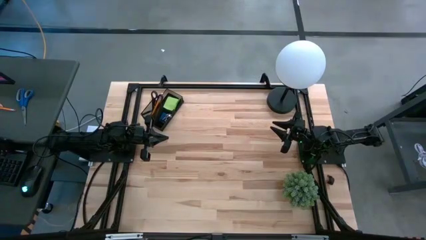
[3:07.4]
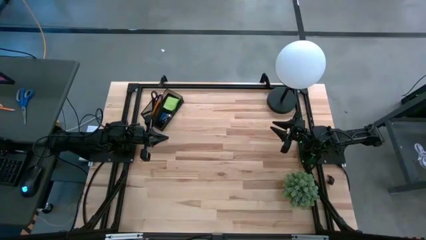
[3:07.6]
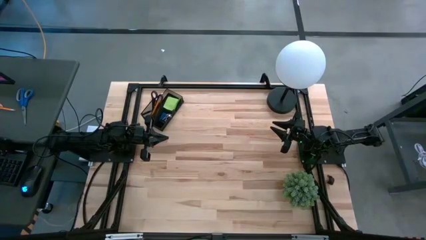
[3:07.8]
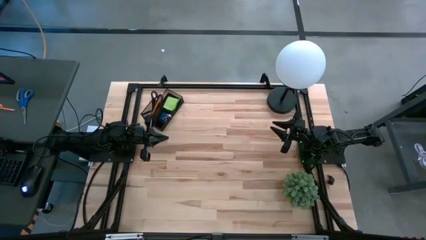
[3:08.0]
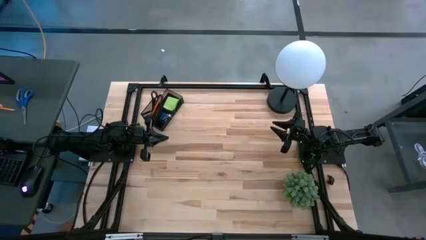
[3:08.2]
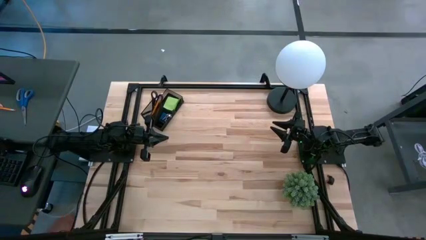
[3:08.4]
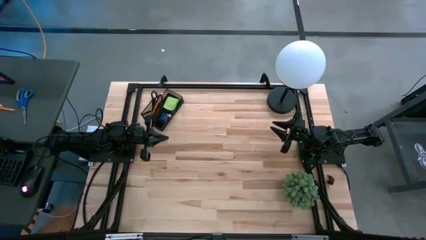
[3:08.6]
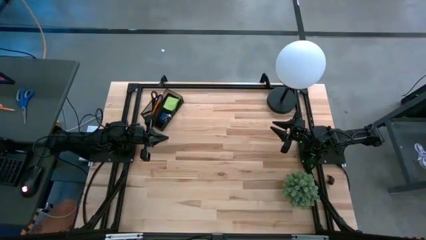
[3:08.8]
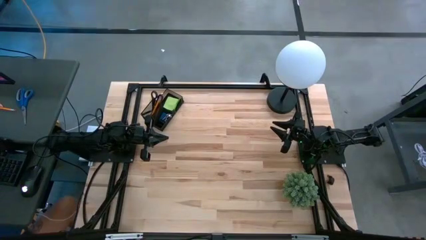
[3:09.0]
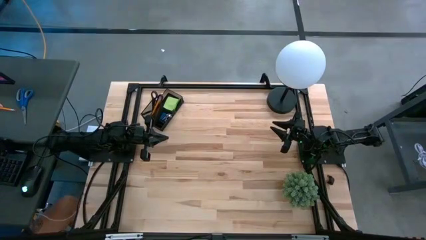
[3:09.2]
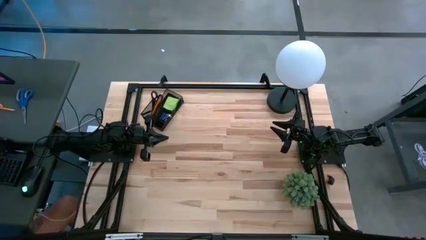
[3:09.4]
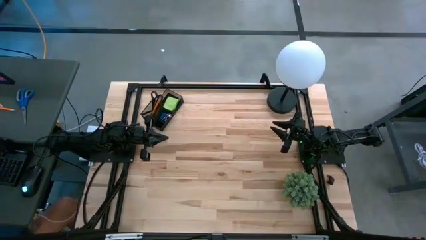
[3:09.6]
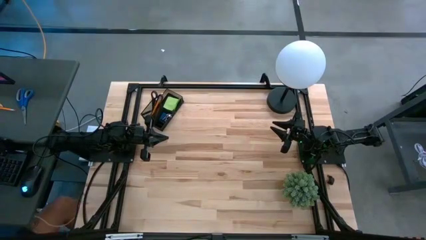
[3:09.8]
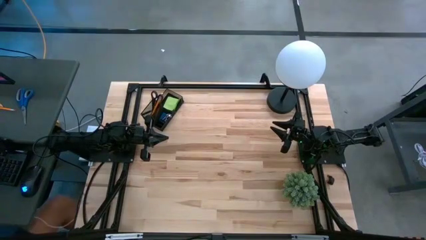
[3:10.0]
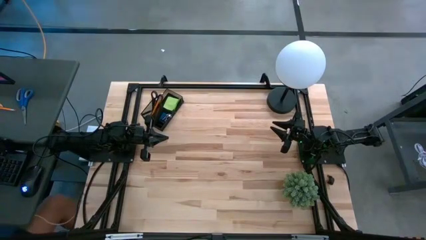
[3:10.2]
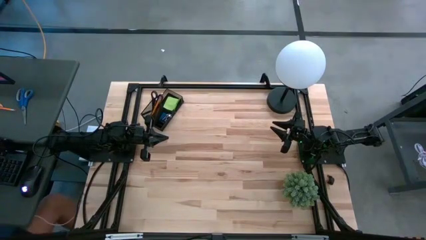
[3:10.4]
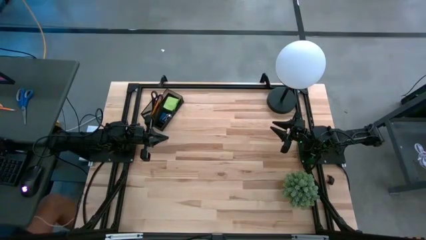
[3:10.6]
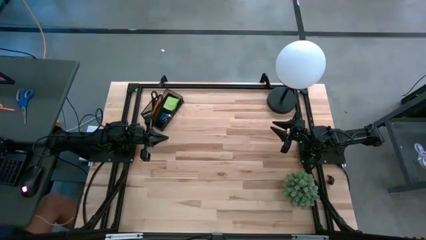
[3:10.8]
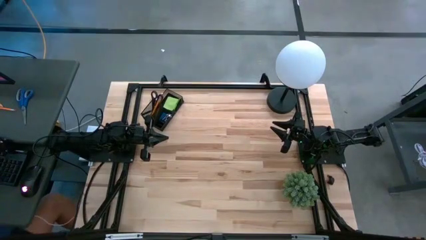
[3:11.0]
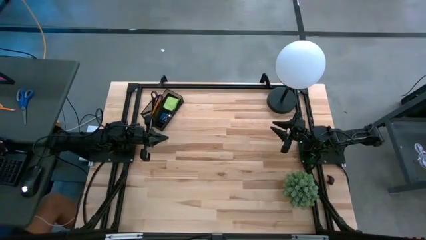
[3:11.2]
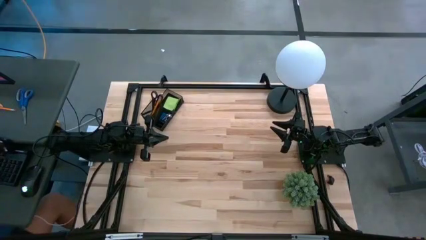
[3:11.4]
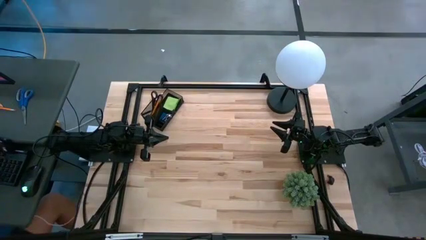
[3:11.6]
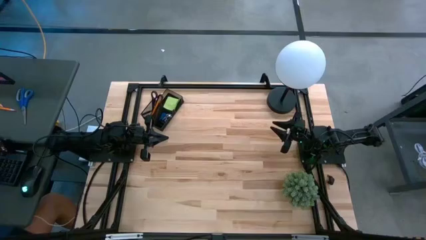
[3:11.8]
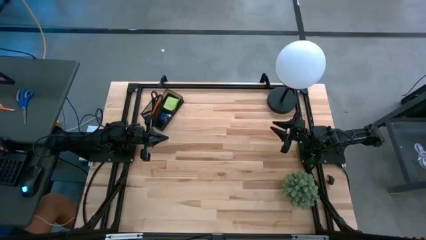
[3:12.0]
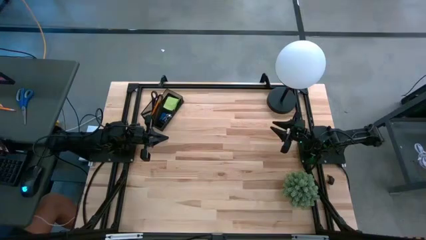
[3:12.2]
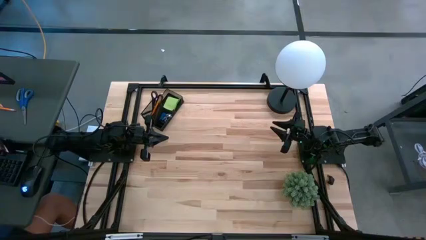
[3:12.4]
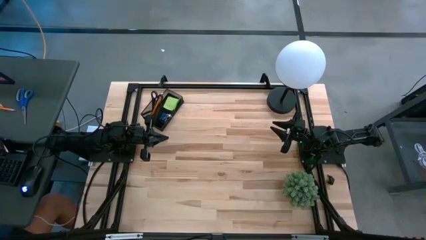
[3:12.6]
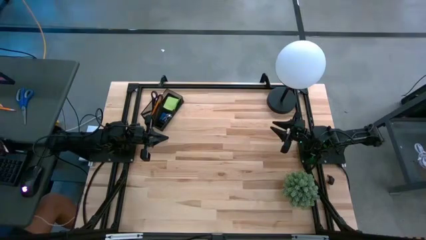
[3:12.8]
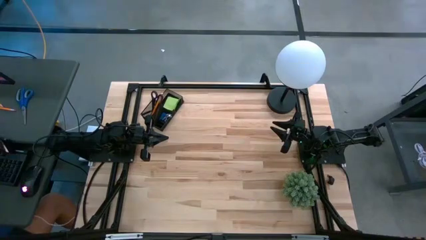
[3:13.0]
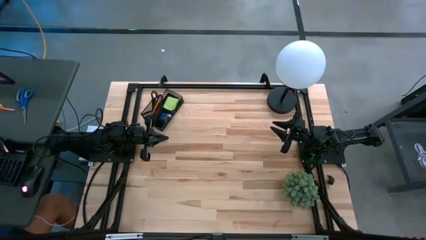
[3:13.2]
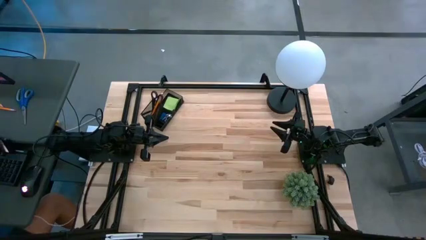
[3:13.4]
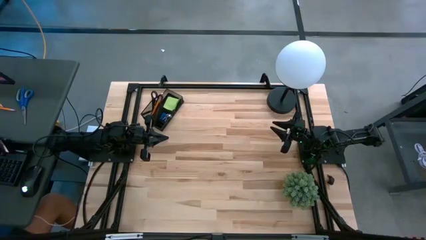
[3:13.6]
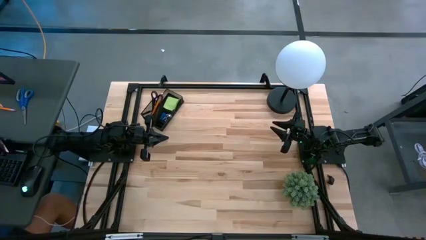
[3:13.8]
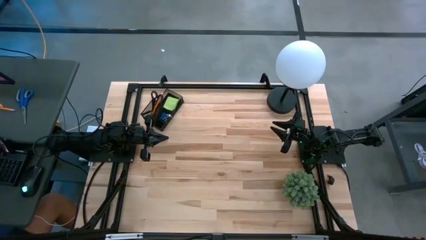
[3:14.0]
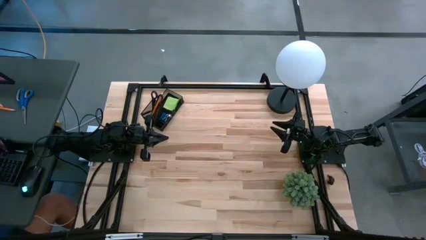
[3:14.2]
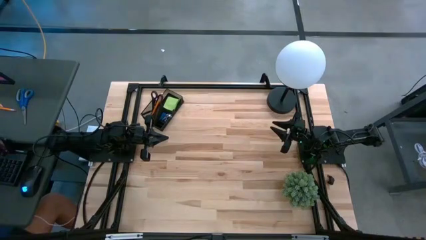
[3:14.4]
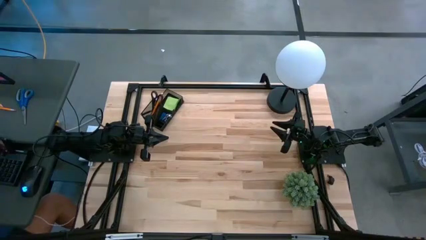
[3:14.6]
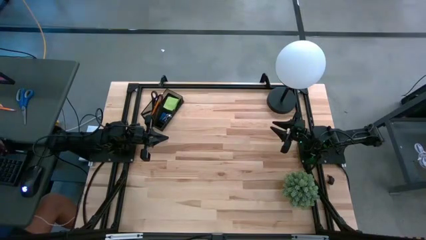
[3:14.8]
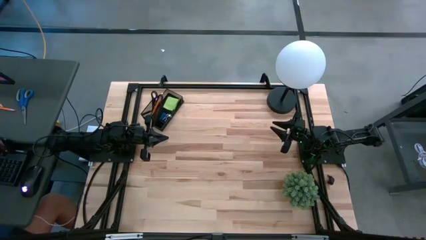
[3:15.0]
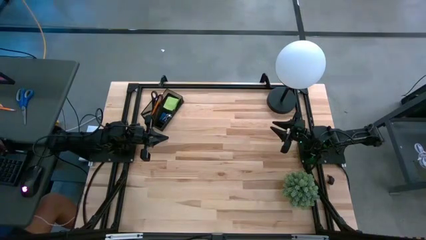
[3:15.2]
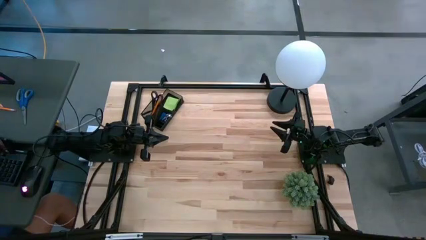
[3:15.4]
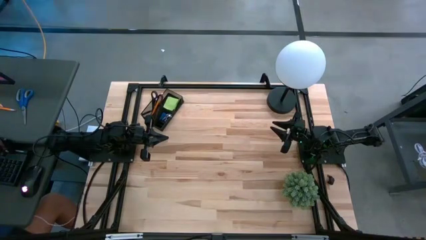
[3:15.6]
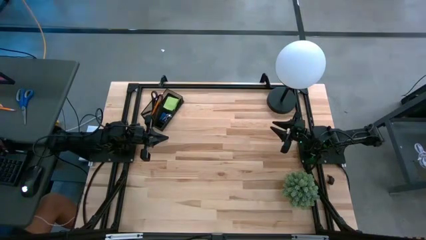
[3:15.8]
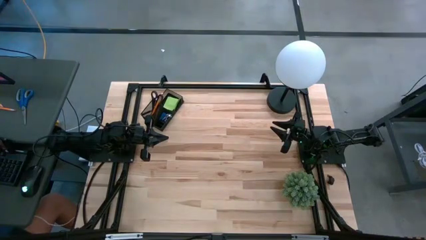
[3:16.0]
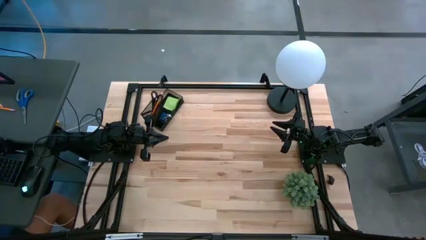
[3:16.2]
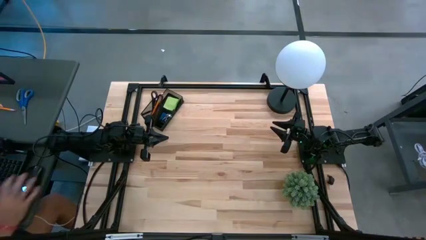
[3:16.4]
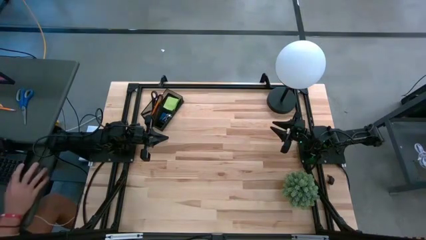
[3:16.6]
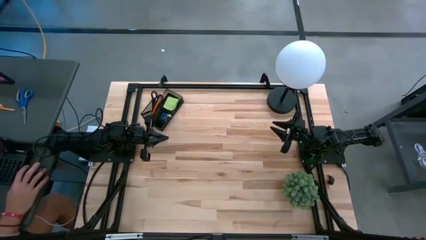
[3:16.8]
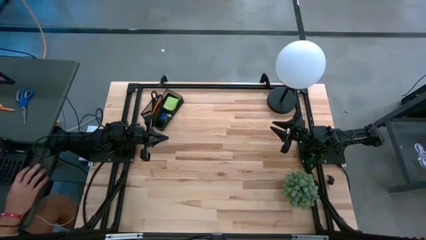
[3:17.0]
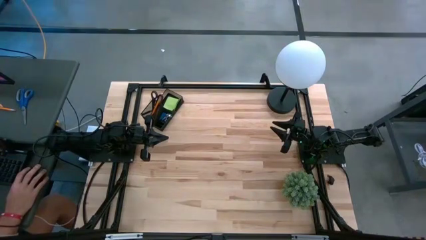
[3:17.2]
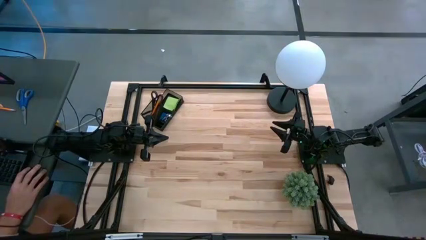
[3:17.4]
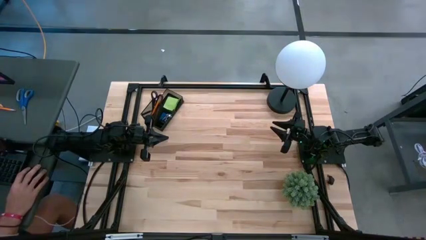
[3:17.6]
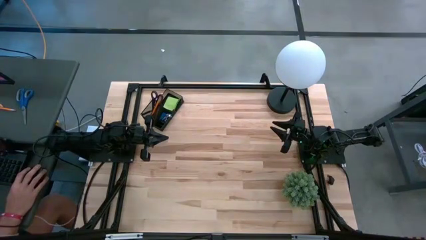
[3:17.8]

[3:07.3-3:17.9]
Task: Pick and place office supplies into organizer
Return to Home Position
